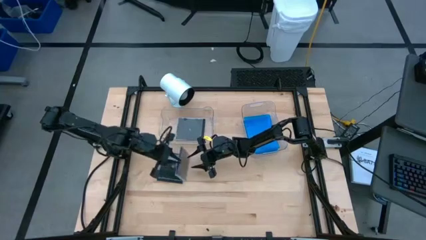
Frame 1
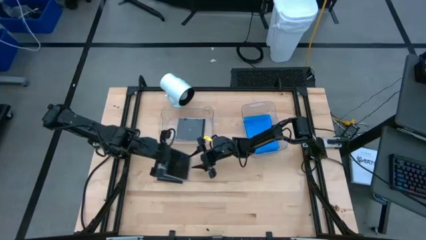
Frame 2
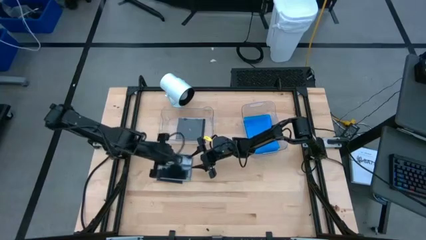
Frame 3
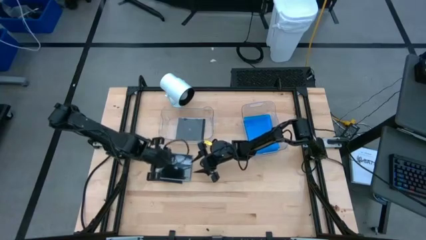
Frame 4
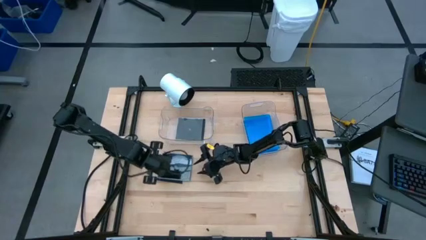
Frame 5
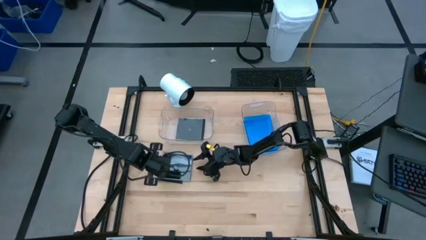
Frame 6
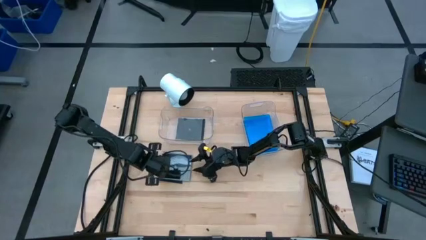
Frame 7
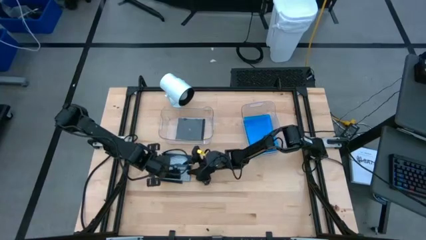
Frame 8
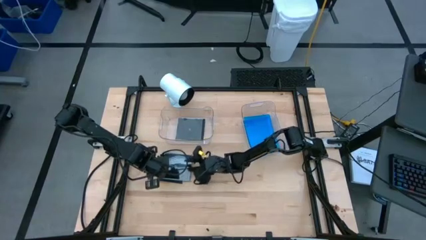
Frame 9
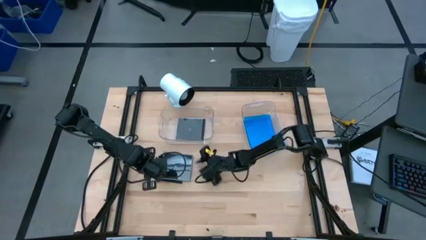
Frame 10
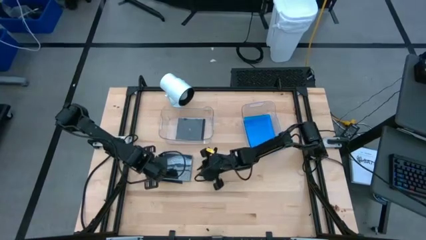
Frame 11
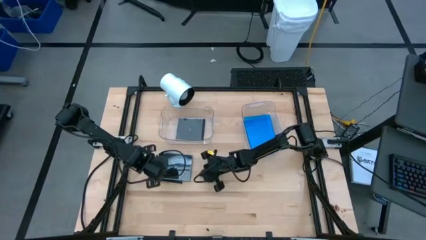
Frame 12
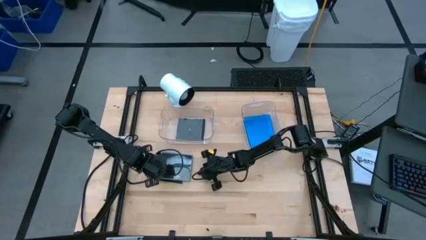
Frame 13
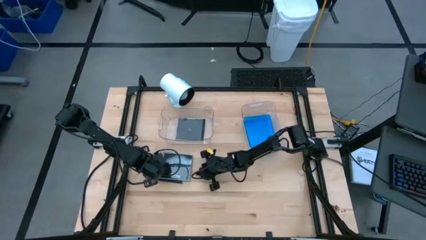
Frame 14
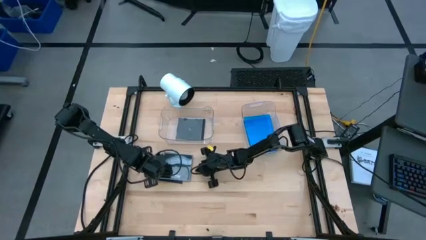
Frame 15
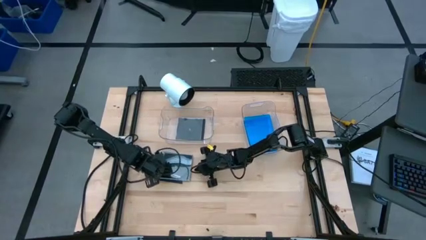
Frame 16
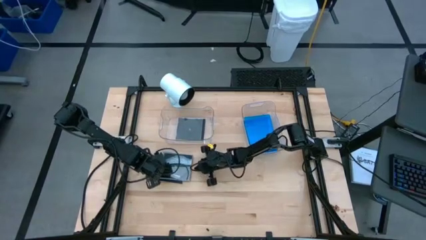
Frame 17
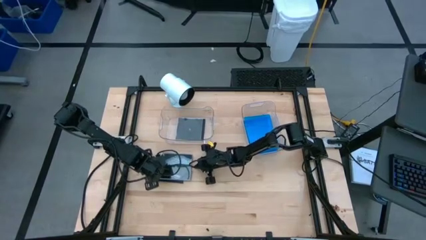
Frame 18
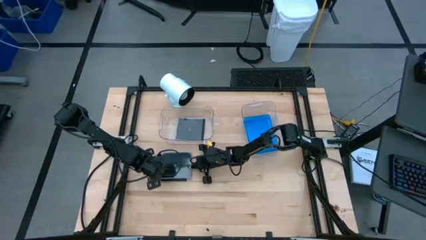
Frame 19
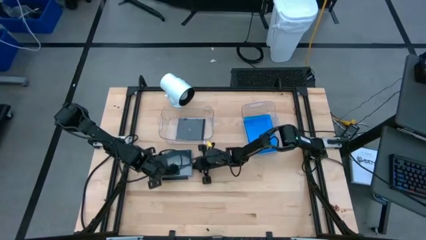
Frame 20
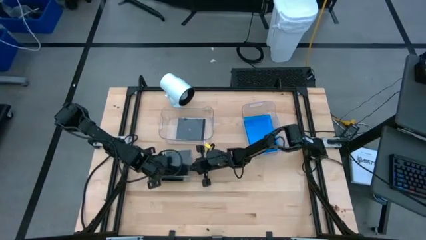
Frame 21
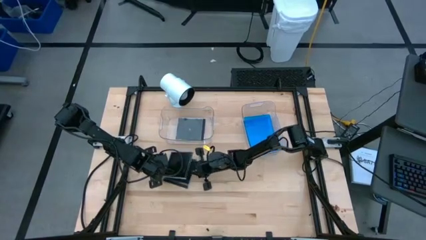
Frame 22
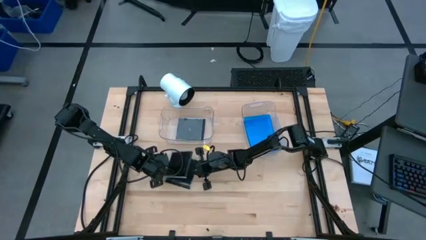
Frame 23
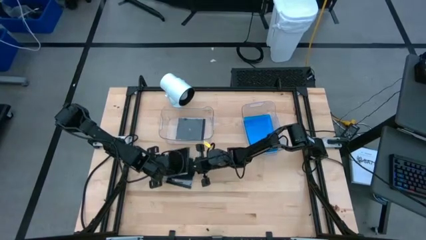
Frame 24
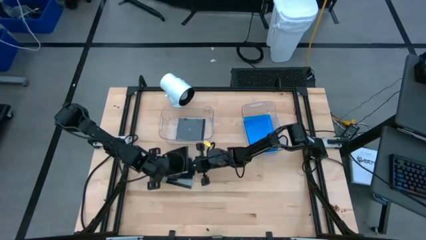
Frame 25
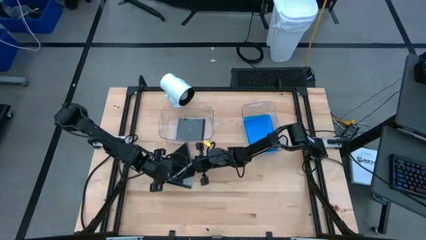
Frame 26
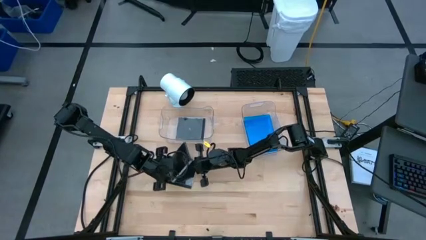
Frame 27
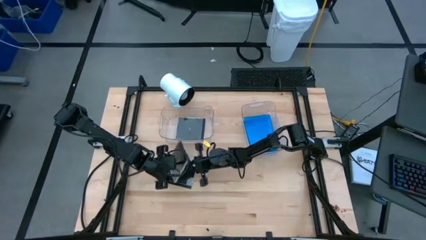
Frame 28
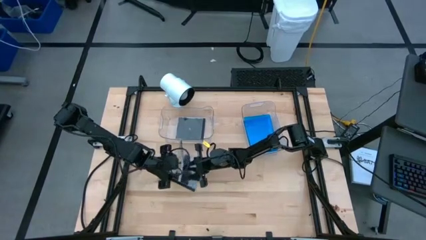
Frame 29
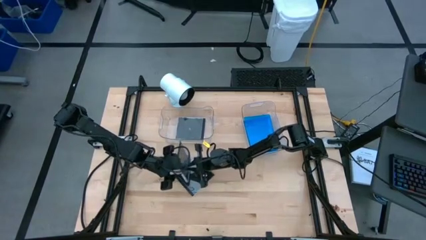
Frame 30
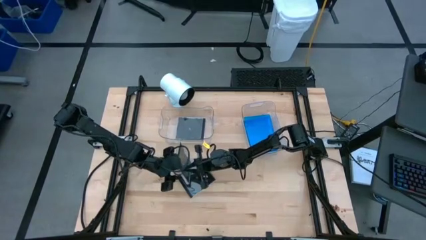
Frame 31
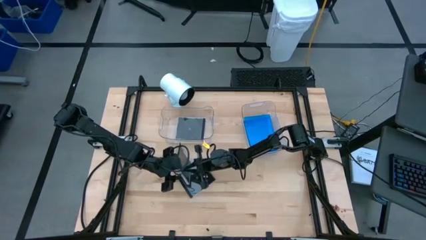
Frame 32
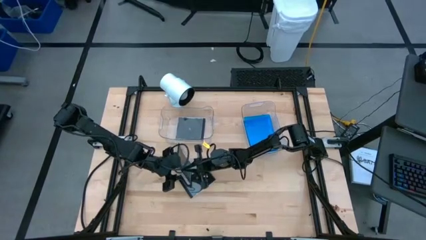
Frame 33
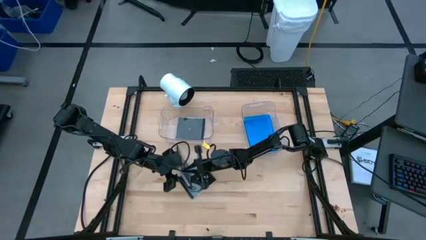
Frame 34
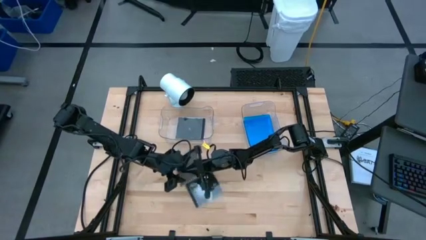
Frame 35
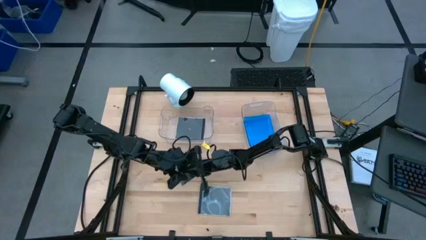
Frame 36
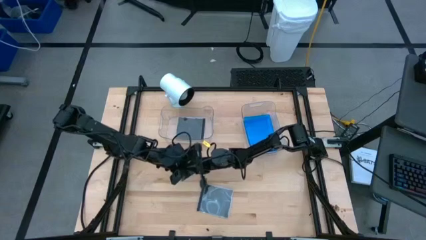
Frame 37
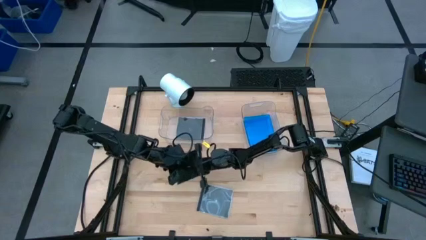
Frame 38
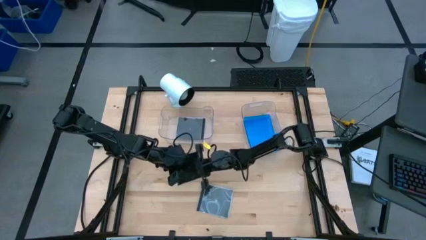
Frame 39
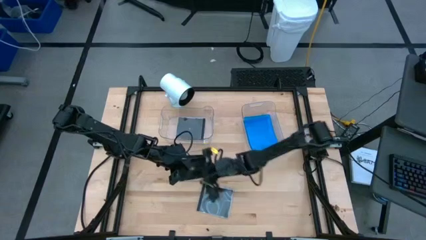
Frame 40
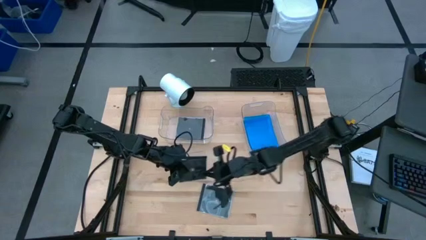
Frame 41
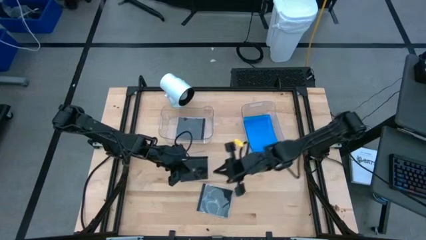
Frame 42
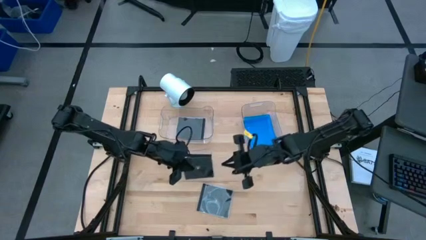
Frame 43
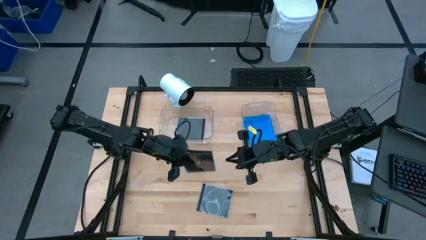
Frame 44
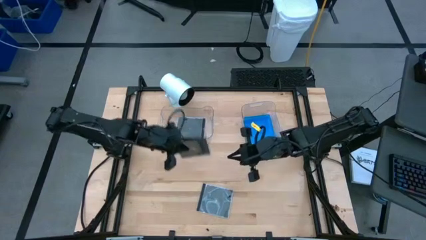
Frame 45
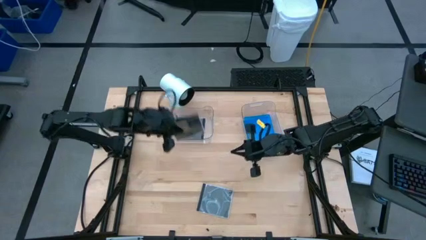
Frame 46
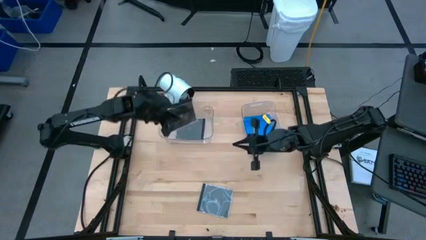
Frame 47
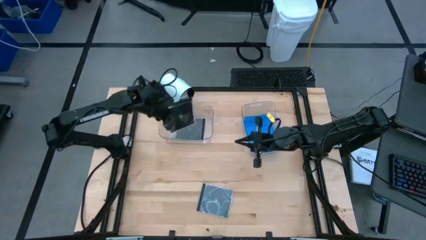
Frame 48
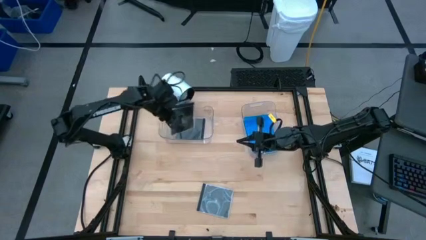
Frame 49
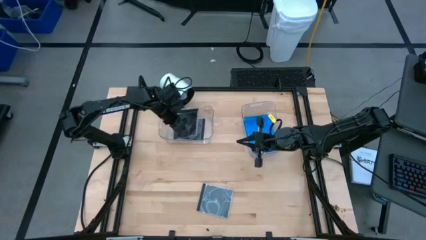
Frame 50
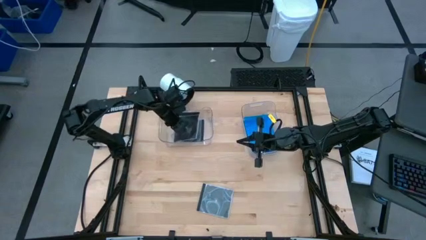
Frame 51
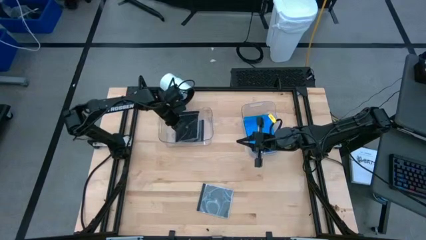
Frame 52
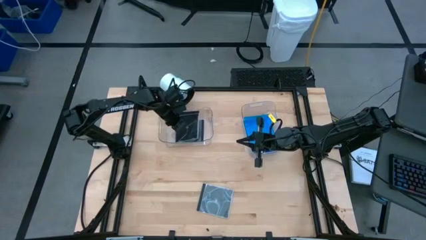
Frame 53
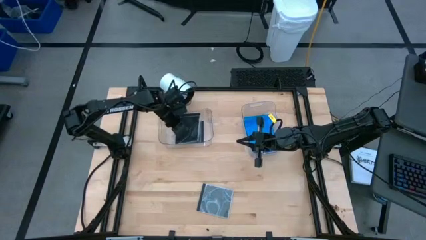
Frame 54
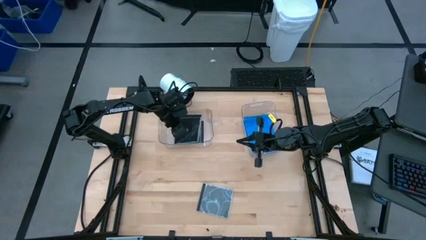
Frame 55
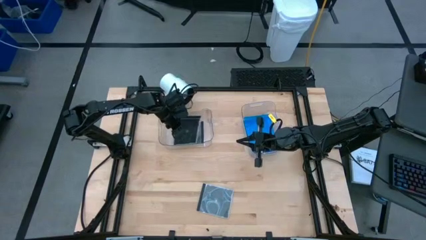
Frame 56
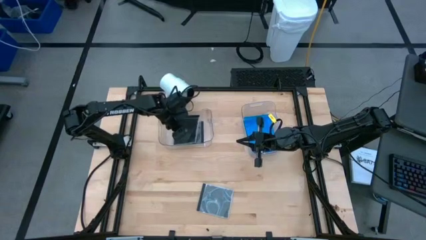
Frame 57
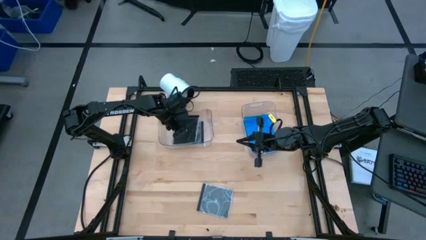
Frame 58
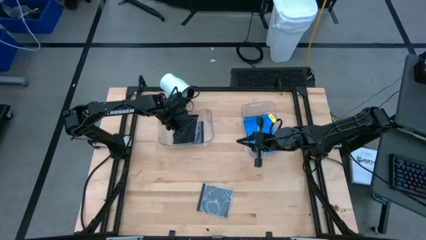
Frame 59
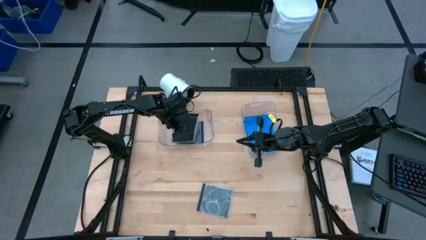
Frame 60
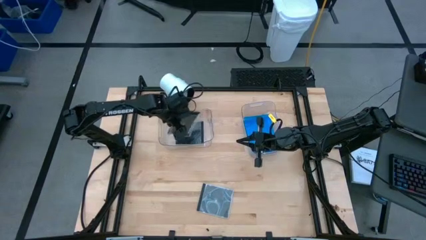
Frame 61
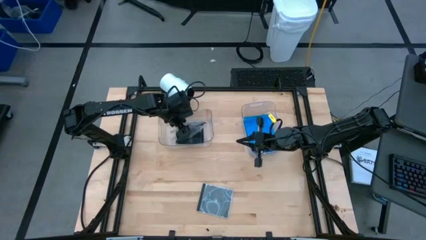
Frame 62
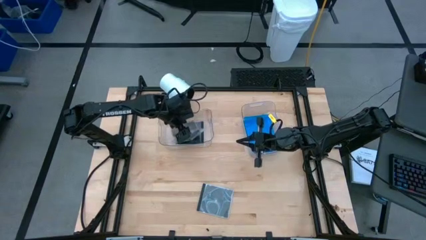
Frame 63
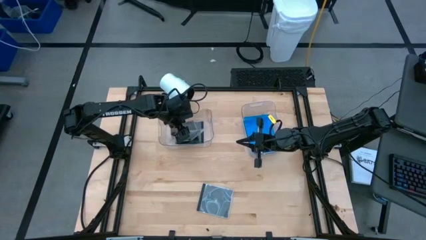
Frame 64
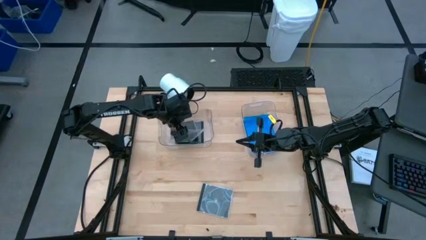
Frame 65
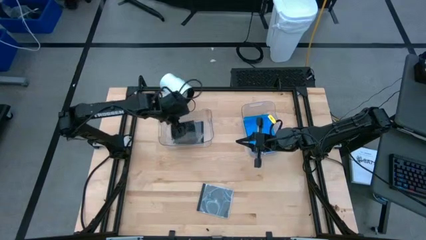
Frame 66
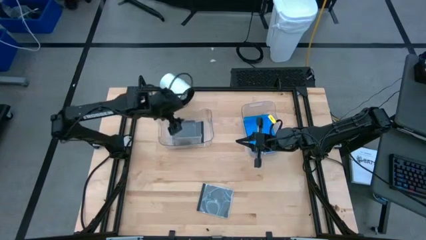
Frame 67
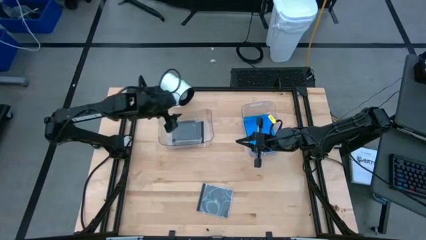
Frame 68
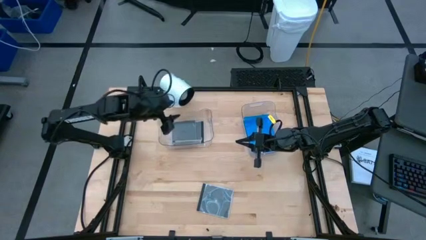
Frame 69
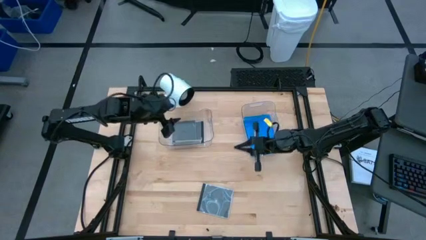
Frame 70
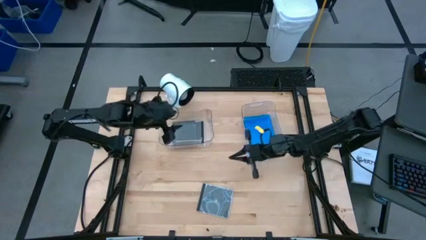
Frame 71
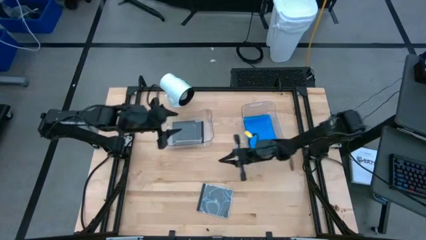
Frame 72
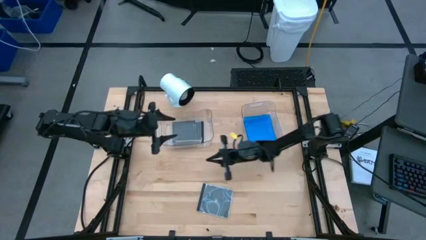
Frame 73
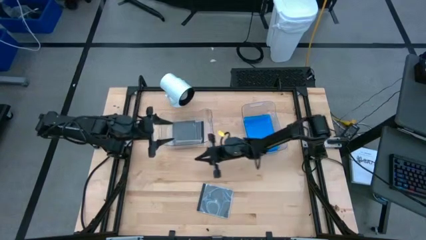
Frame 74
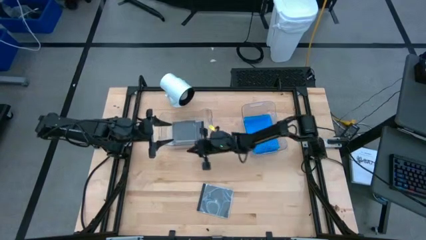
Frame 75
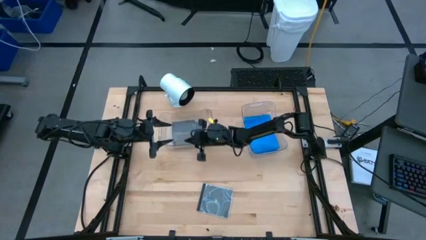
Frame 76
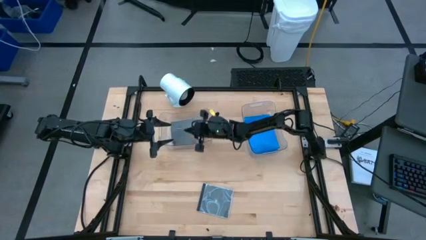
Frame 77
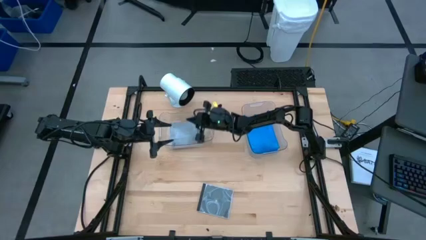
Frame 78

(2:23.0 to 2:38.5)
Task: Pick & place jewel cases by type
Put the bottom black cd case into the left transparent bin
